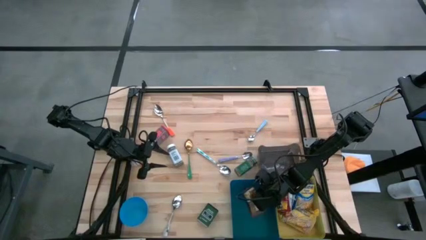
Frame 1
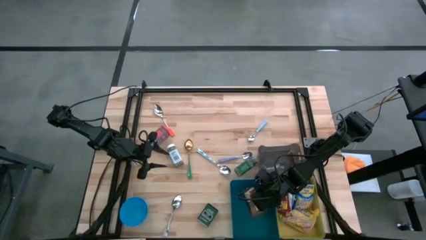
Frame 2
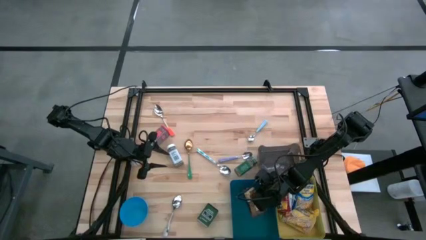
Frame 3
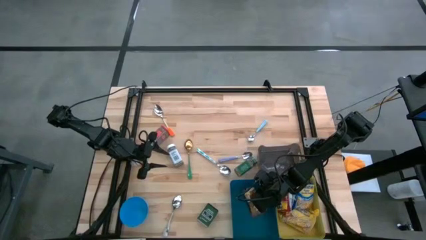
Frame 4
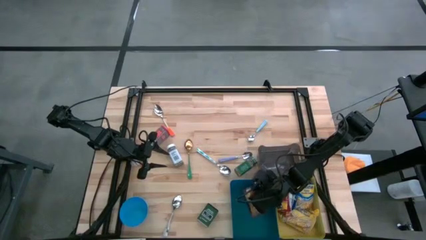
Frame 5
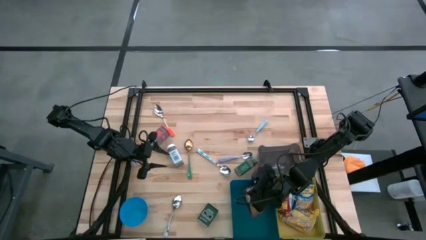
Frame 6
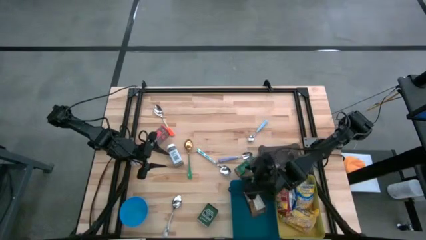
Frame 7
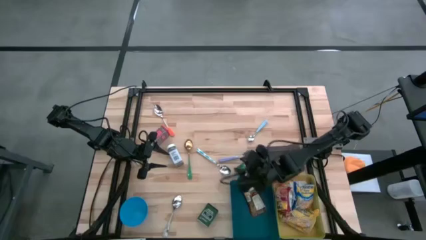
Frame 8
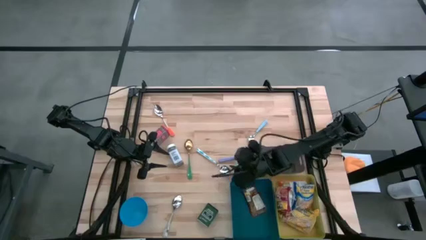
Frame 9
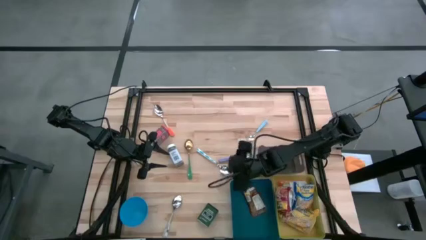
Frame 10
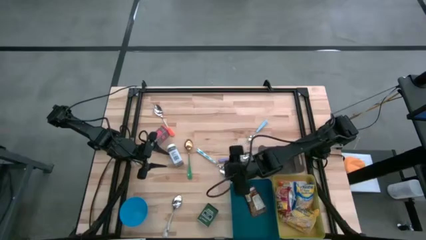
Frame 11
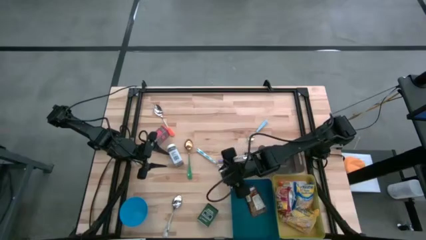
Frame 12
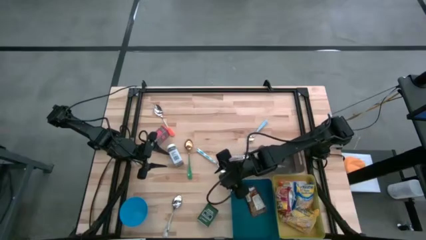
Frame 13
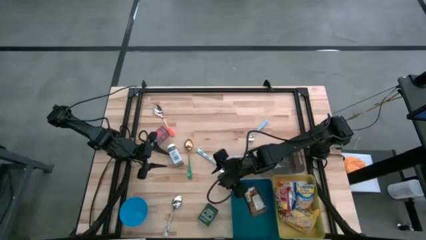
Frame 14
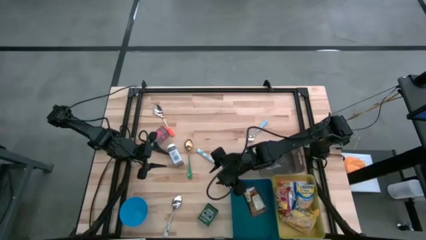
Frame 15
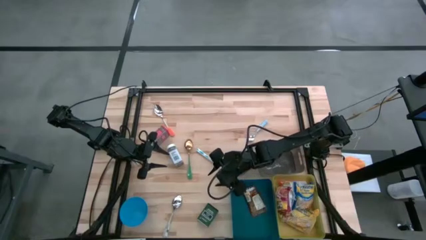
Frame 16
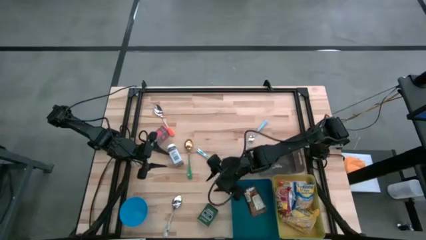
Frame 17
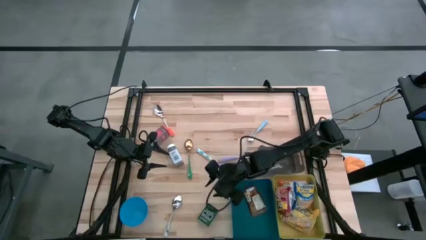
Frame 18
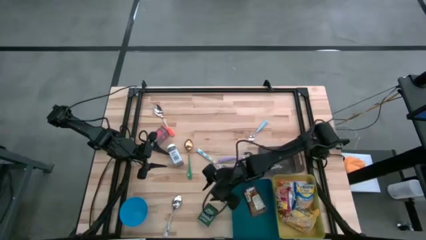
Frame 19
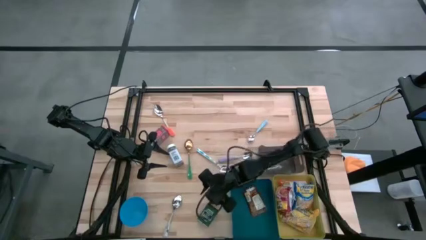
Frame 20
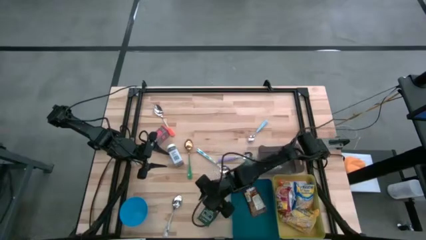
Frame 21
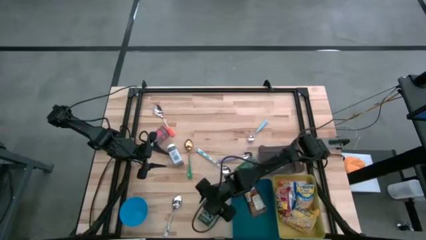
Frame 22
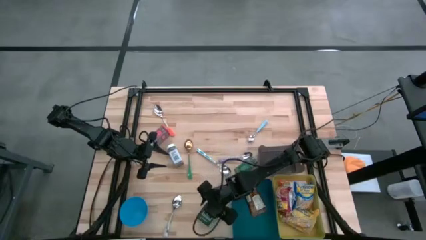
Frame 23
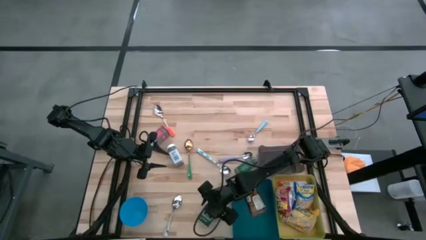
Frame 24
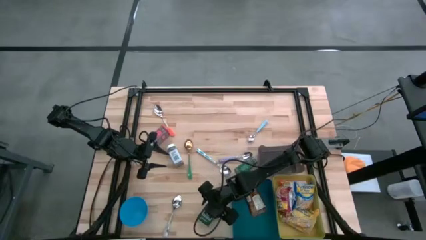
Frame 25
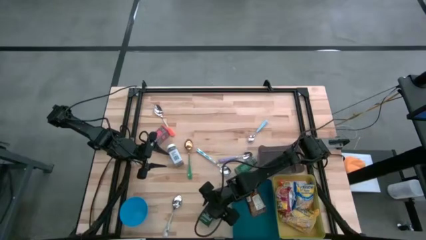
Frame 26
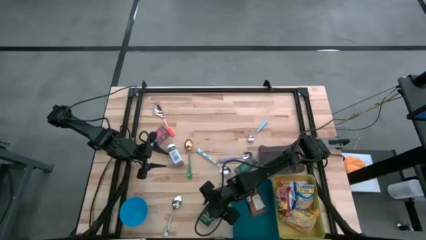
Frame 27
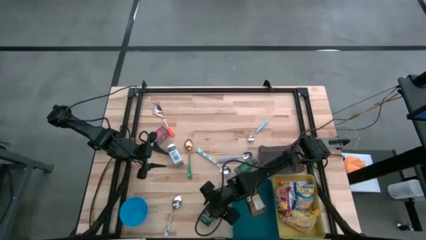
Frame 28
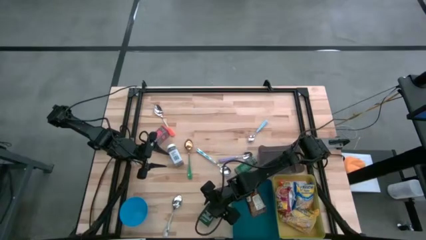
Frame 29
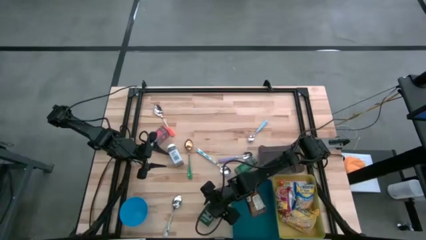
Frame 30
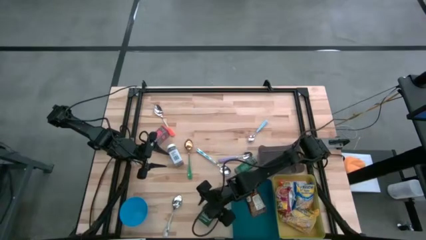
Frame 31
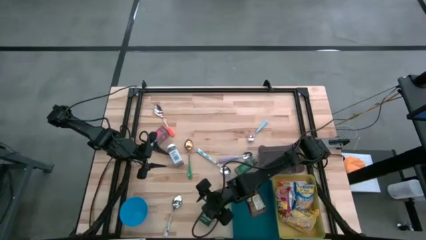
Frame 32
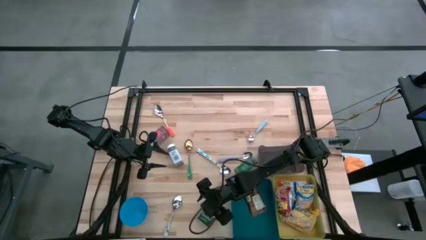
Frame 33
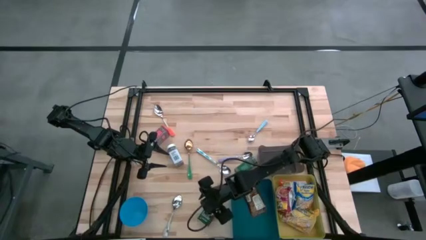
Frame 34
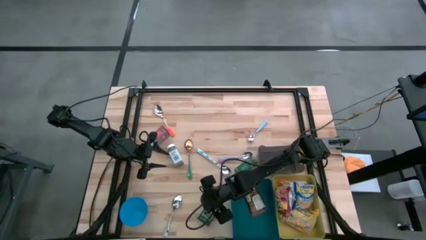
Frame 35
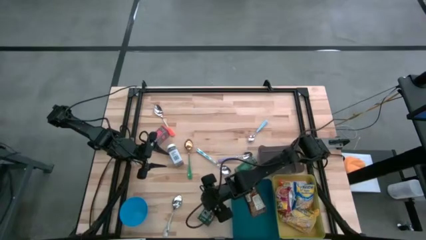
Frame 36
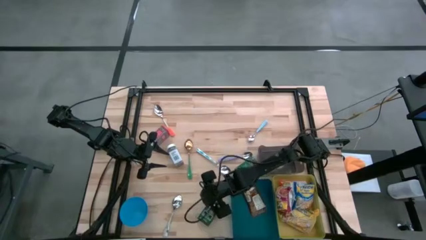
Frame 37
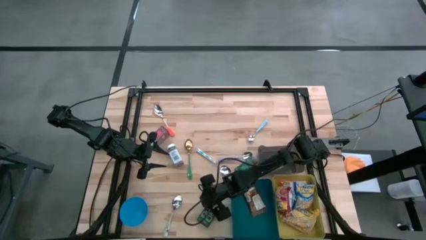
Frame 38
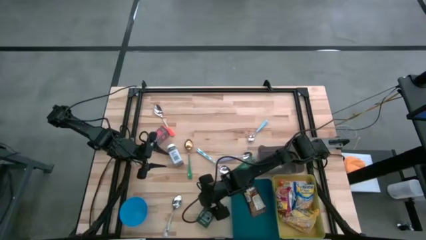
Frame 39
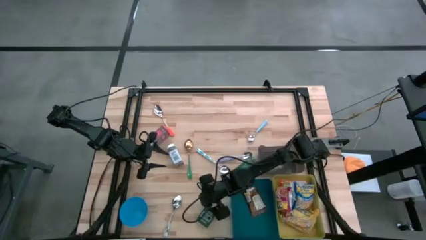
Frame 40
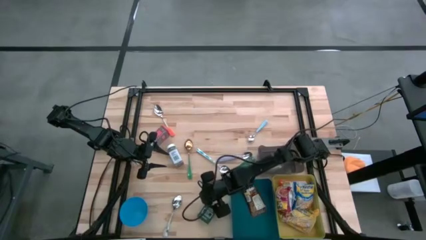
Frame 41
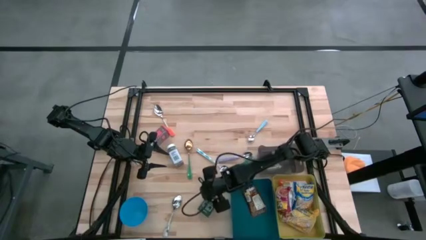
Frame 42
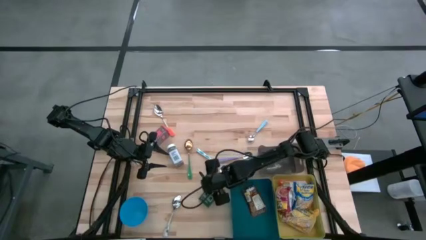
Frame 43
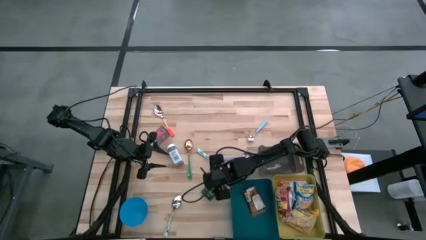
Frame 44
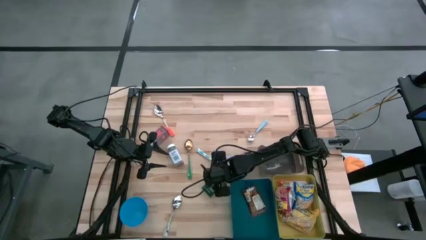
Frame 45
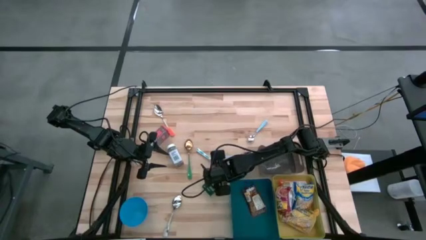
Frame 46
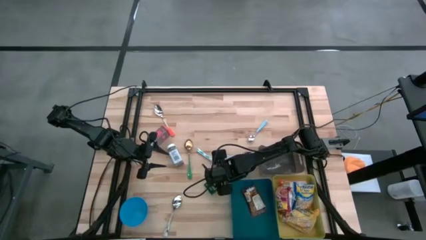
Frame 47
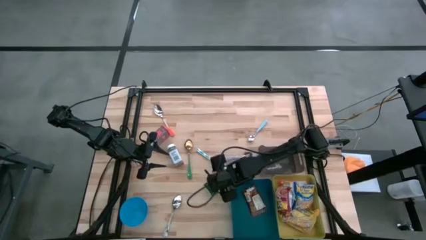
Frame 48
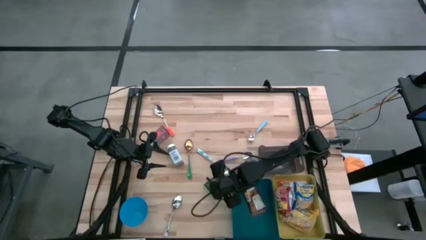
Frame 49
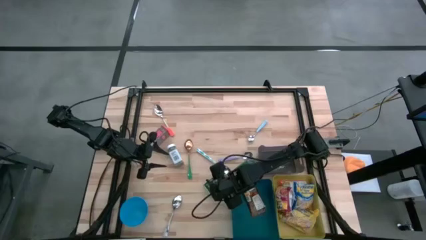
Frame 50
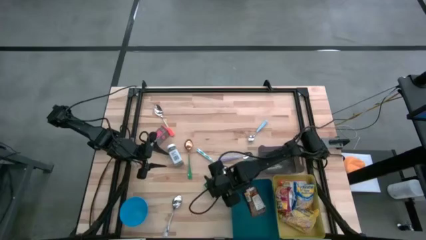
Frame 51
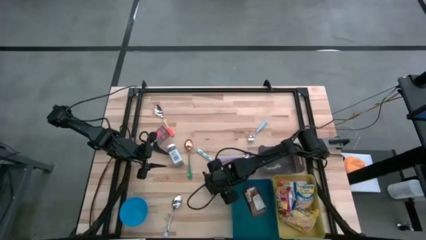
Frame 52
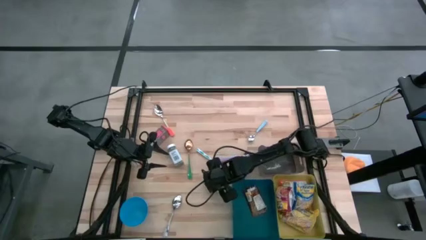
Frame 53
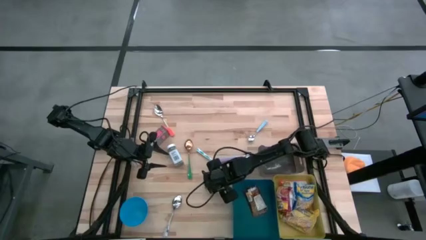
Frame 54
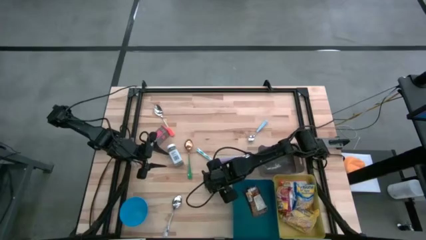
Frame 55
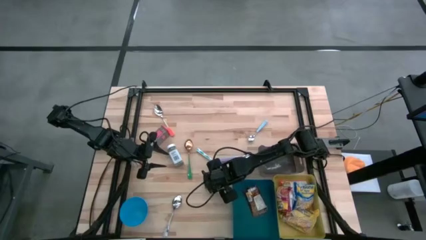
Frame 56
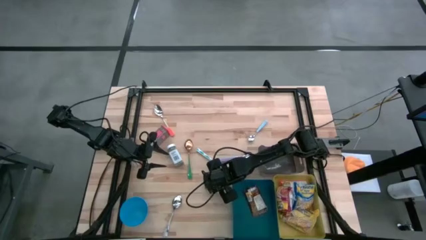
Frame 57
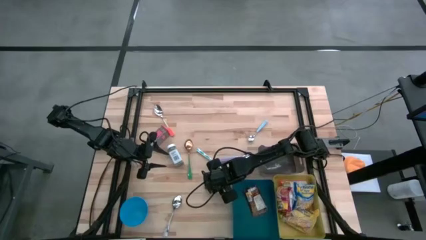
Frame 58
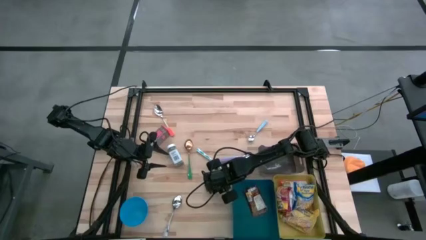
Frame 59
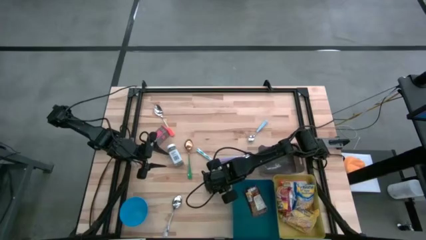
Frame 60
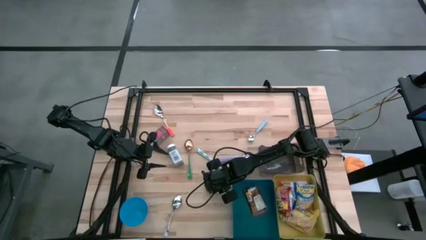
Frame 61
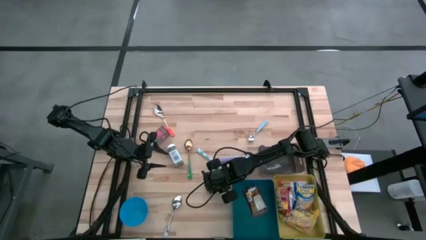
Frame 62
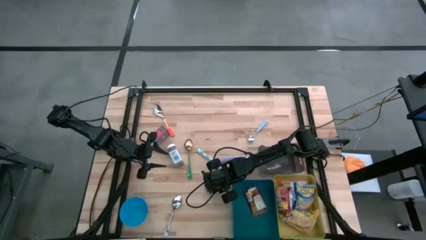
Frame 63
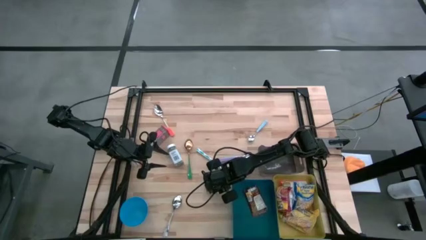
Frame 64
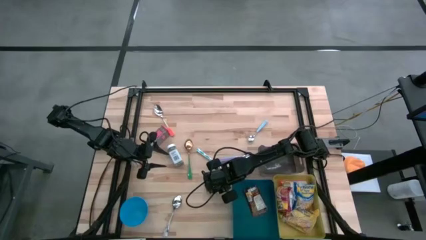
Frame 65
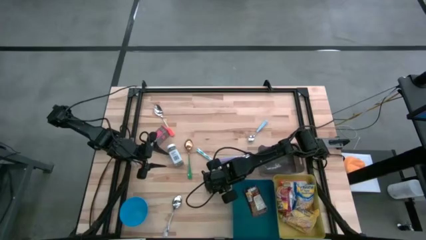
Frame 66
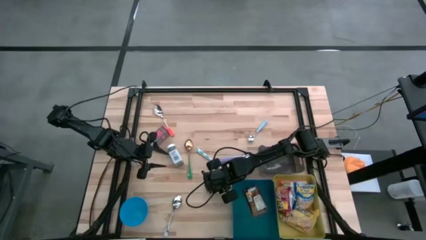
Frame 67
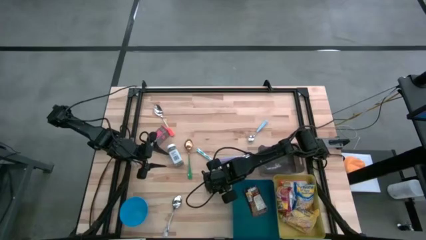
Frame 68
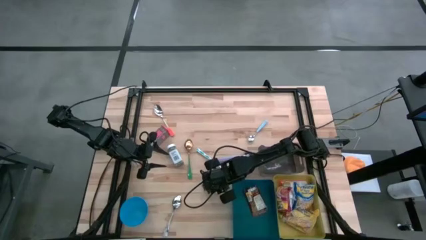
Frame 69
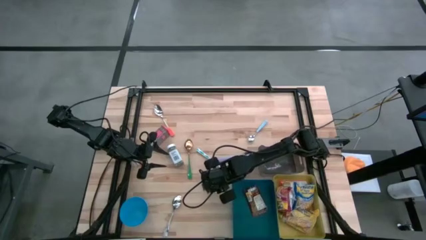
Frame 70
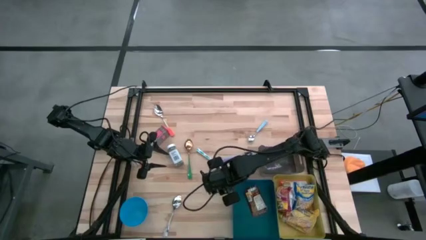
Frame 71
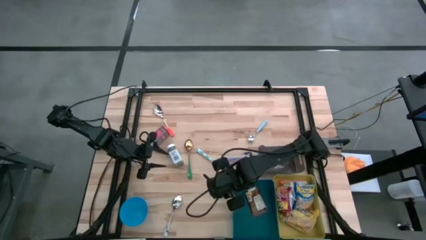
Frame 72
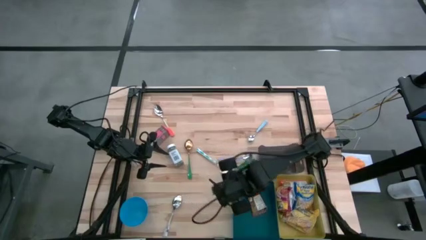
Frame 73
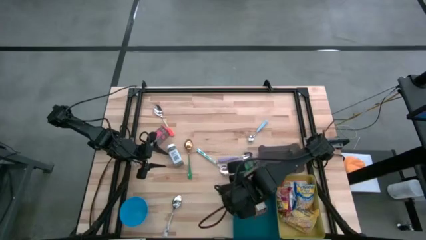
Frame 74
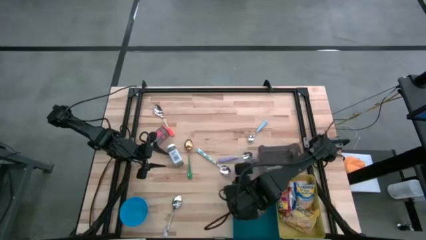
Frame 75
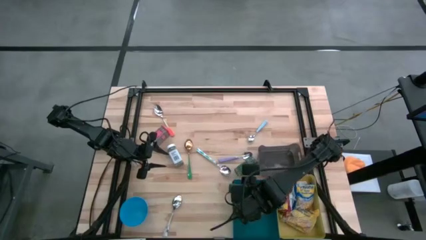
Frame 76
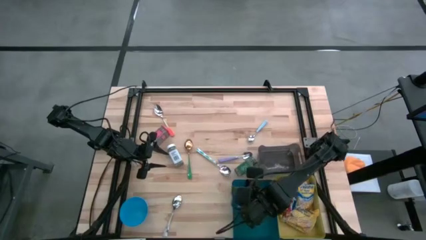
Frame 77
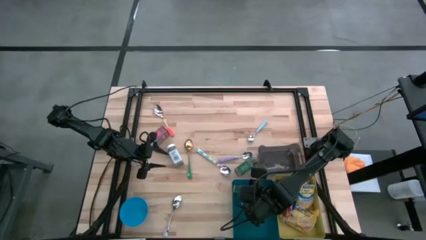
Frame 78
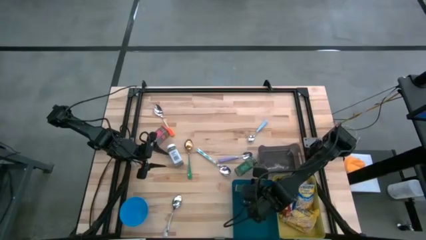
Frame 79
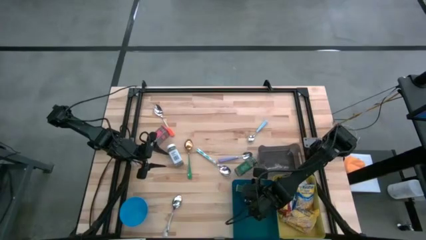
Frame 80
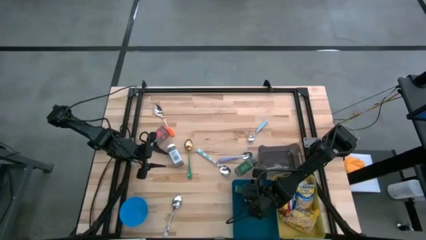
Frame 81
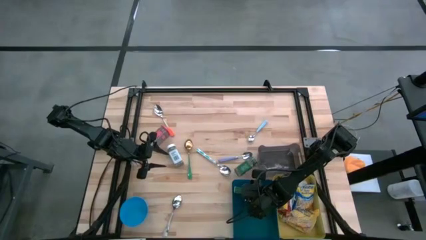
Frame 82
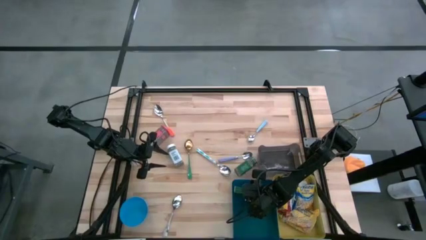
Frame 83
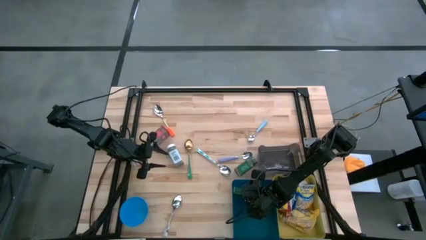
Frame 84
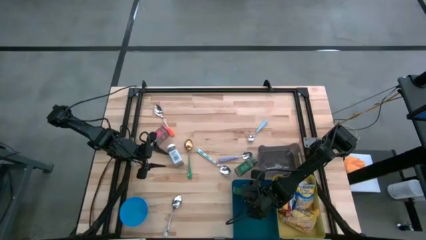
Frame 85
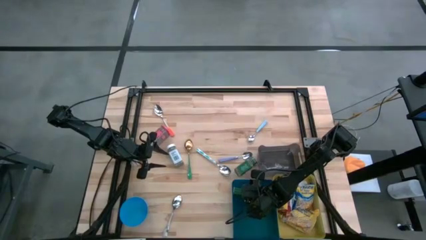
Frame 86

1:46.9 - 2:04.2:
Put the black seasoning can into the blue bin
